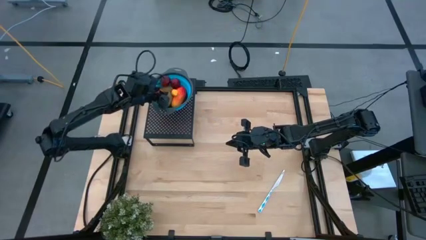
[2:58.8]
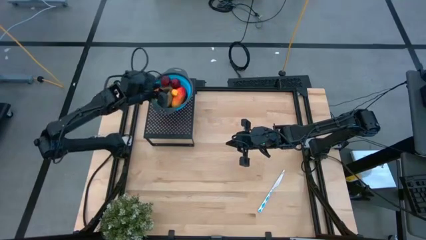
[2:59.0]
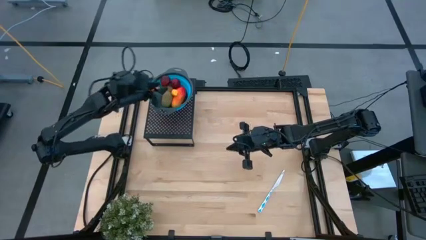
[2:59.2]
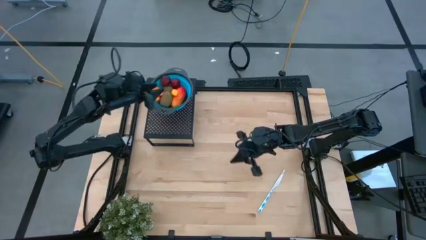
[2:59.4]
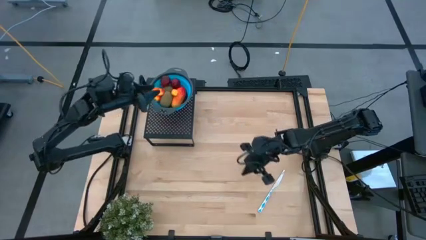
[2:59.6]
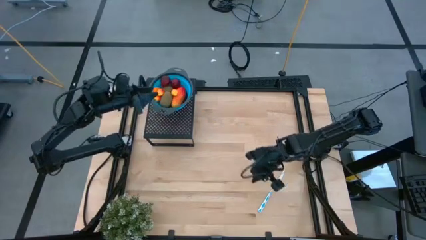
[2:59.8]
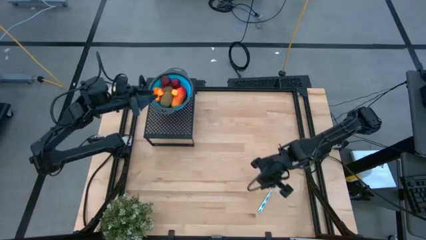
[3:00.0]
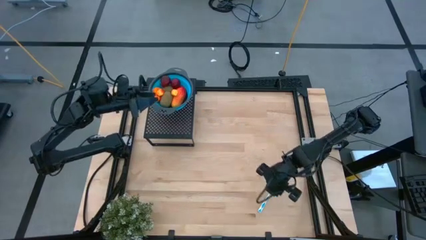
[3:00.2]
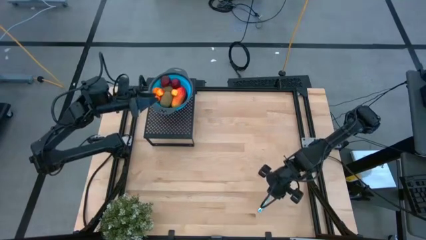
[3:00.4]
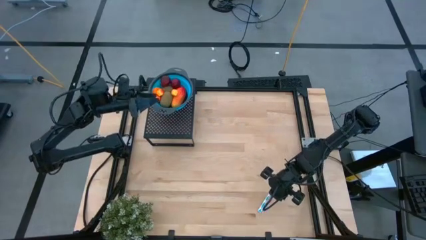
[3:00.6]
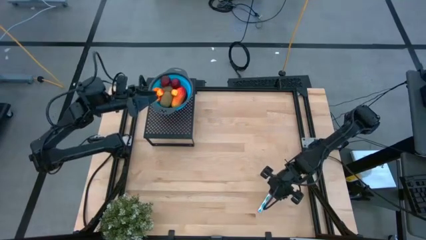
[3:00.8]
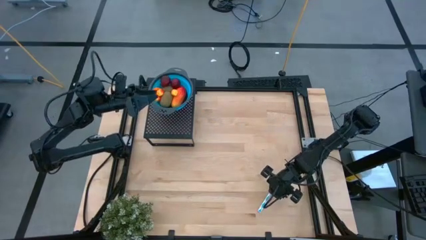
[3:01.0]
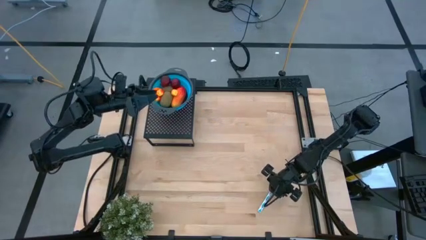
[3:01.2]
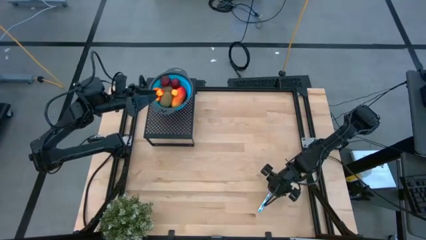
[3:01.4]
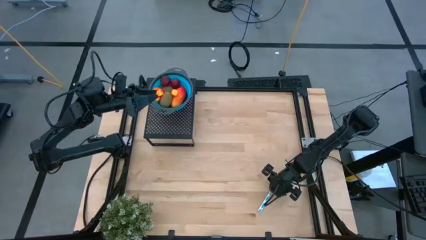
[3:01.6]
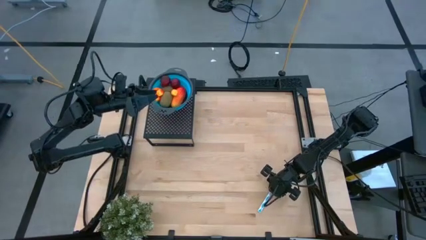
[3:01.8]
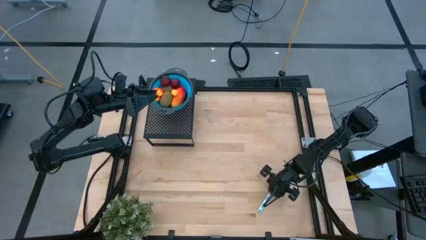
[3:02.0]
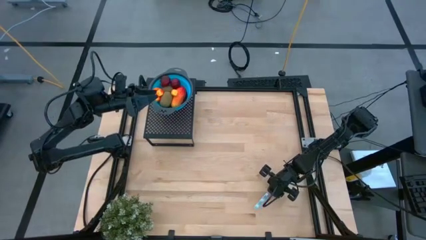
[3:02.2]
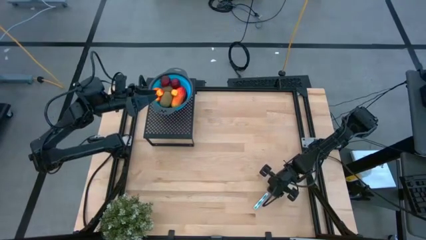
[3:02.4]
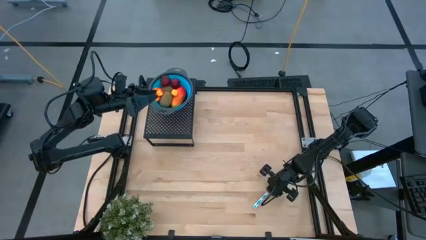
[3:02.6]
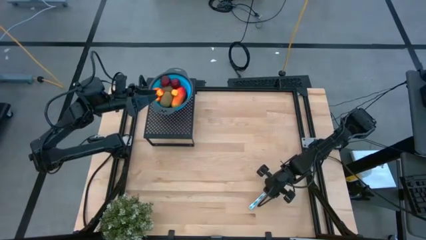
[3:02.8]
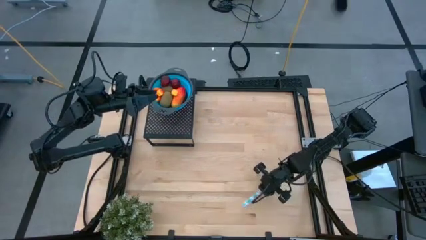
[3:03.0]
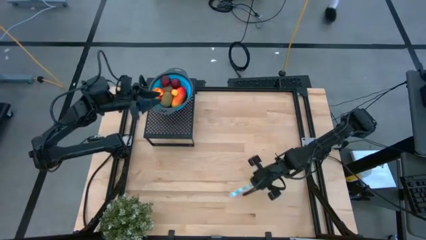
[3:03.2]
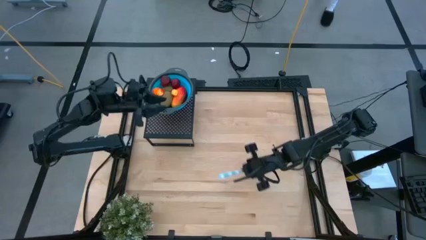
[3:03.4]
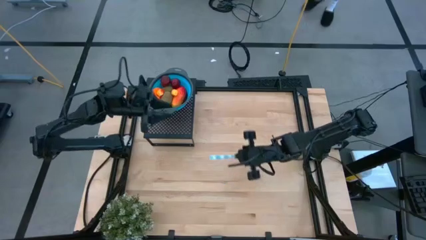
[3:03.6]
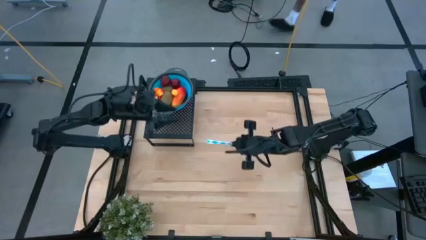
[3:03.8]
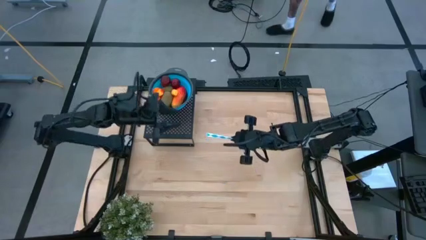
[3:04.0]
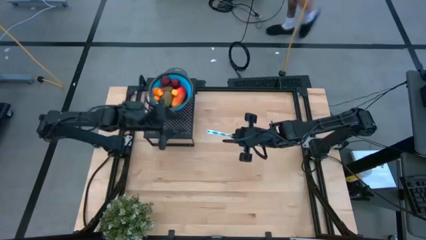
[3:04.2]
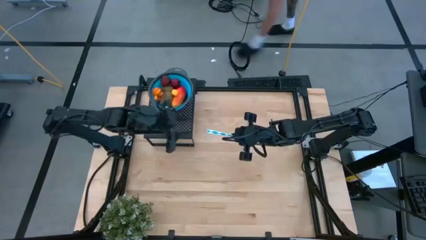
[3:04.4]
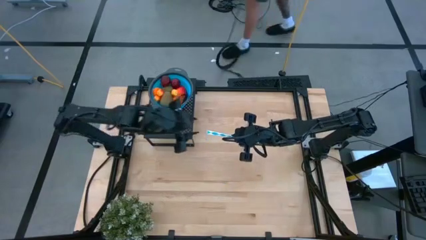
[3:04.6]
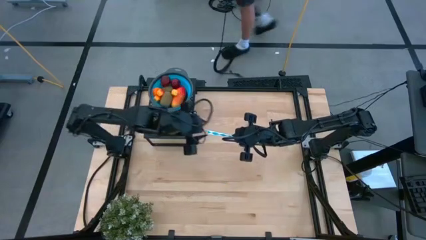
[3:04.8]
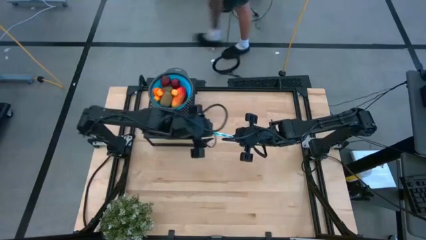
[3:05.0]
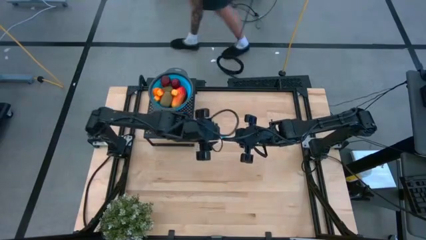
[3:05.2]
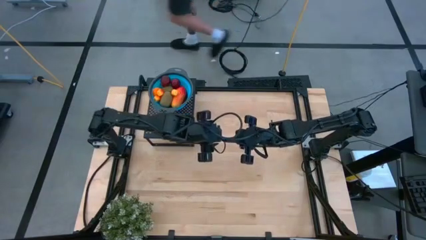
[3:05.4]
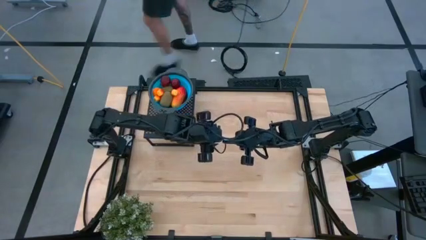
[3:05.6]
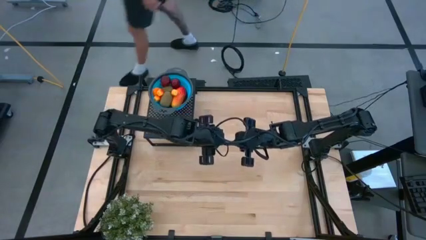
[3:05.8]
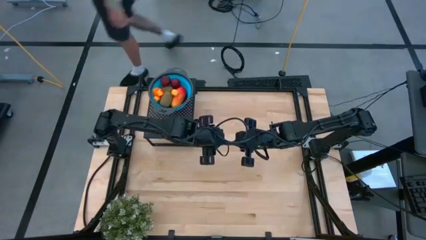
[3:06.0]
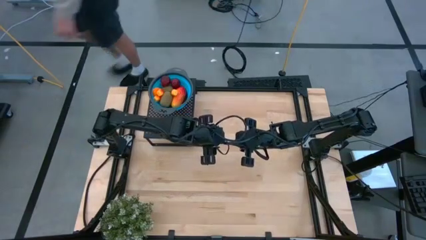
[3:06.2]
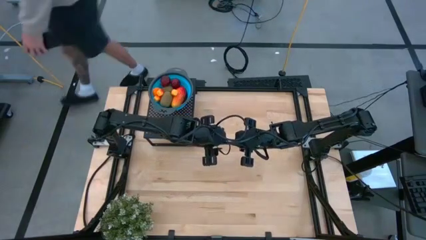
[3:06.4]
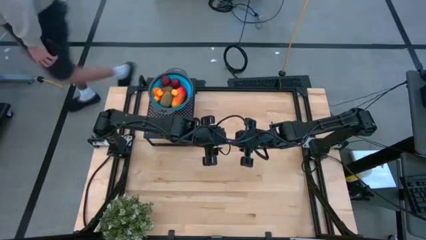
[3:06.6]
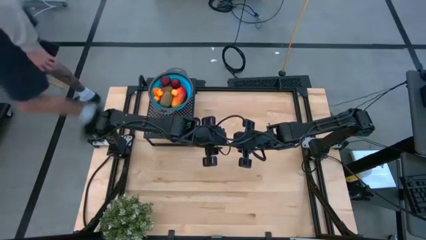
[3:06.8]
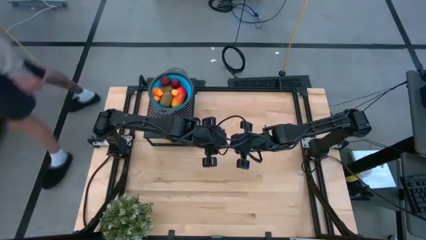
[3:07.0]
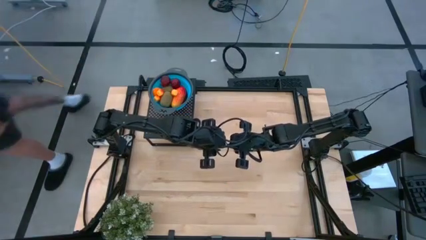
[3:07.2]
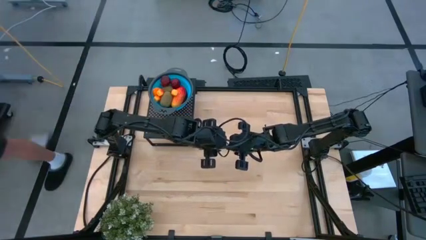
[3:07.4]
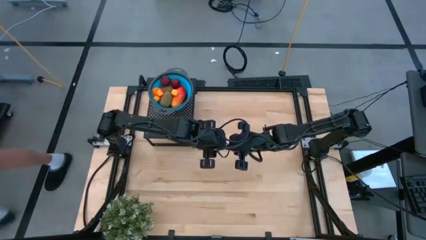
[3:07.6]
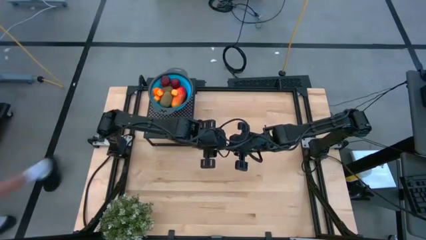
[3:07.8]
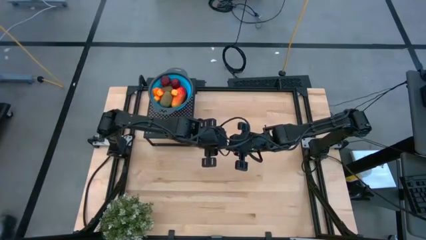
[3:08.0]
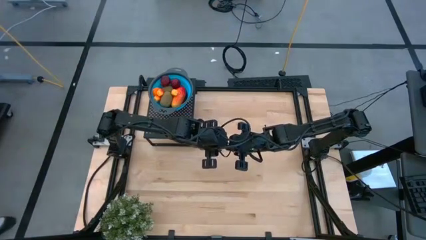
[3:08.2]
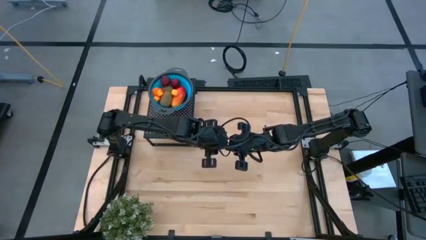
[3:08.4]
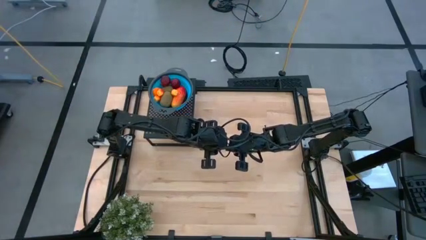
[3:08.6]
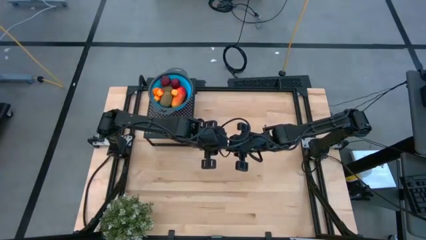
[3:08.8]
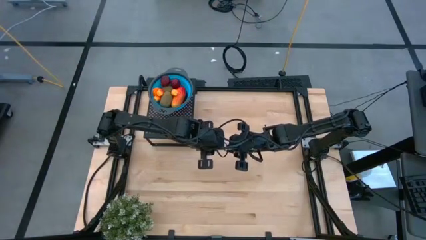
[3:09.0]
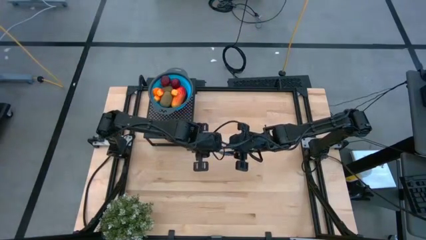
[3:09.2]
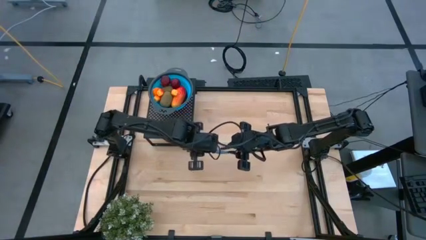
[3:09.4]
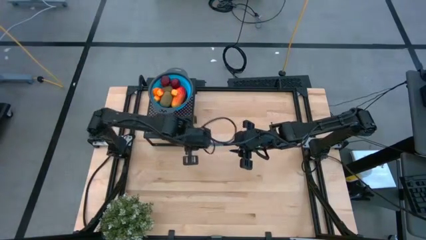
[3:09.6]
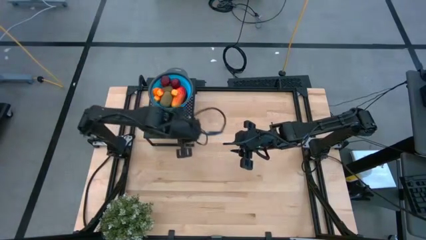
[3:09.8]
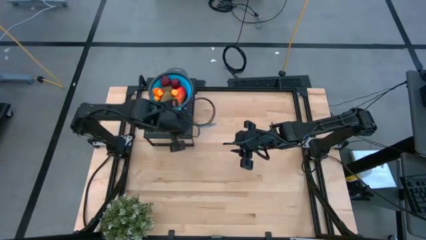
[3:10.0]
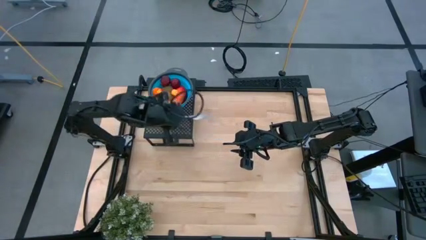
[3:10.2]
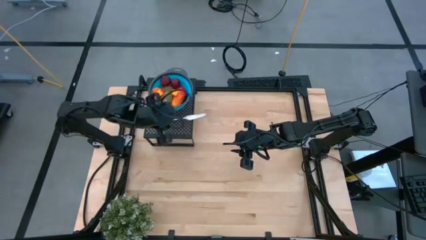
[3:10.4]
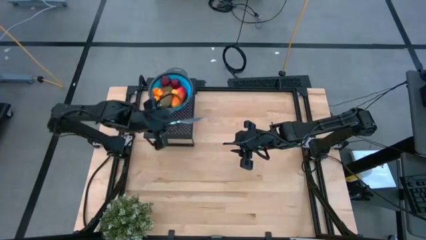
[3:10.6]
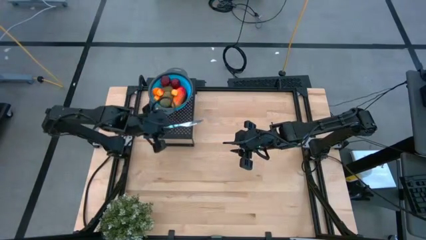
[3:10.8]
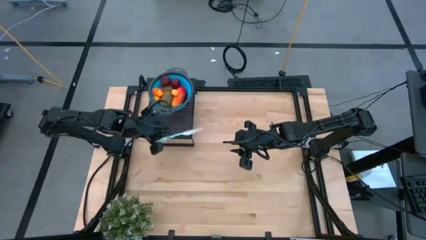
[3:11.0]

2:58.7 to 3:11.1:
Task: Pick & Place Fruit
Put the blue knife on the shelf

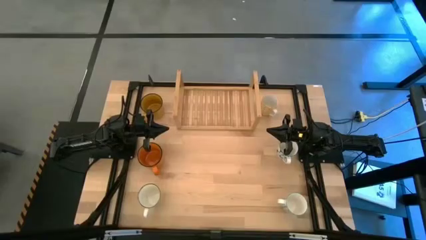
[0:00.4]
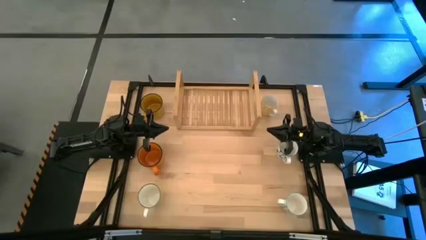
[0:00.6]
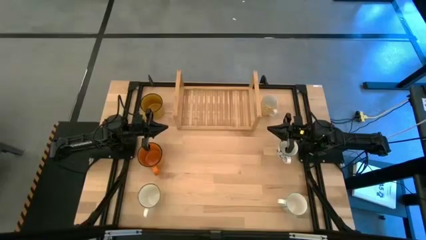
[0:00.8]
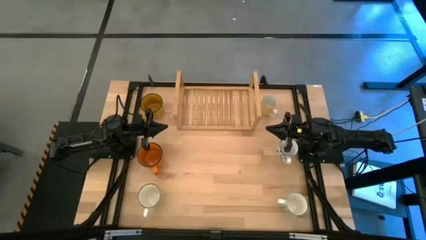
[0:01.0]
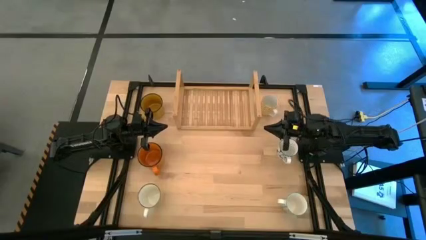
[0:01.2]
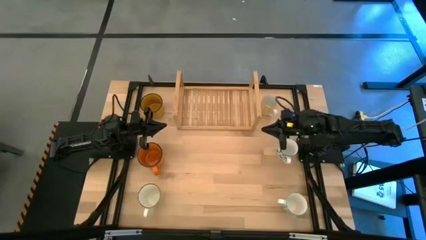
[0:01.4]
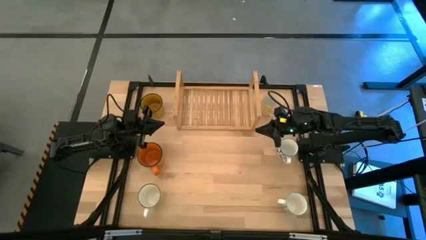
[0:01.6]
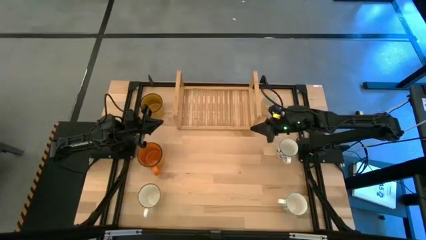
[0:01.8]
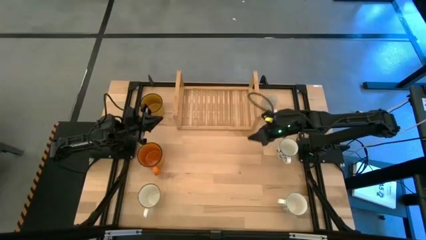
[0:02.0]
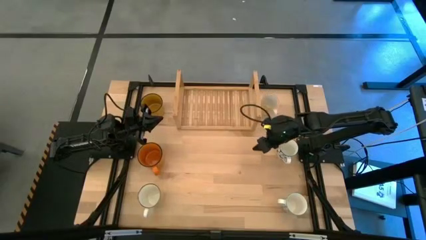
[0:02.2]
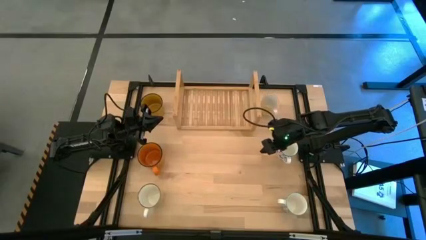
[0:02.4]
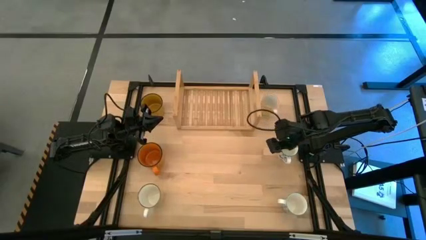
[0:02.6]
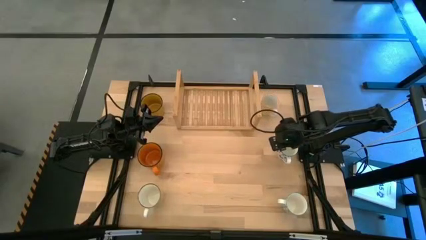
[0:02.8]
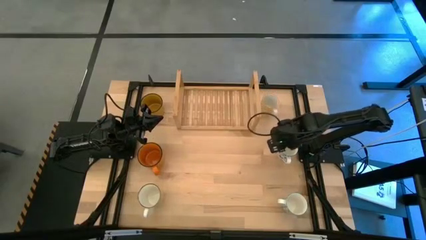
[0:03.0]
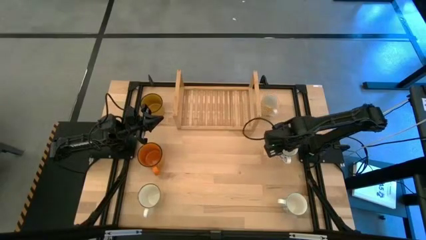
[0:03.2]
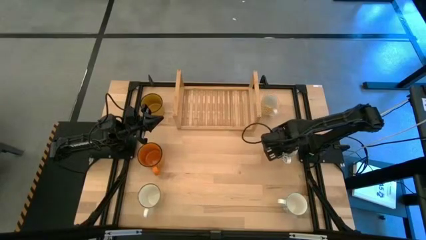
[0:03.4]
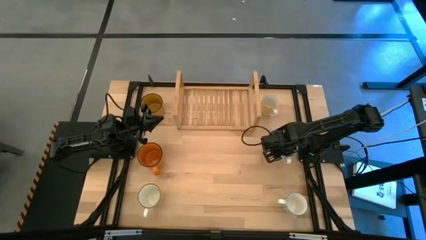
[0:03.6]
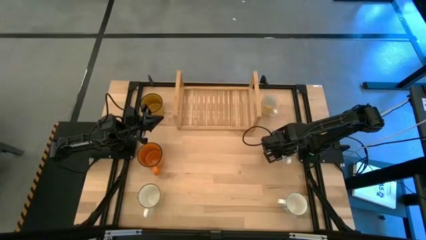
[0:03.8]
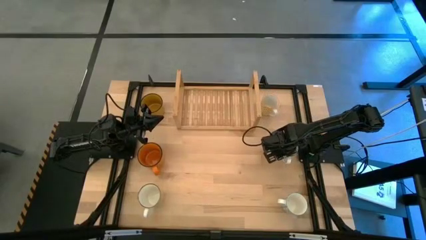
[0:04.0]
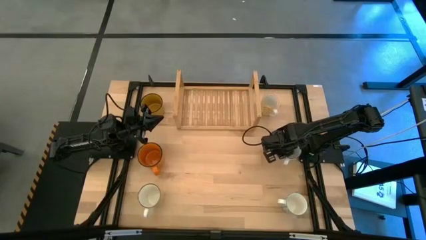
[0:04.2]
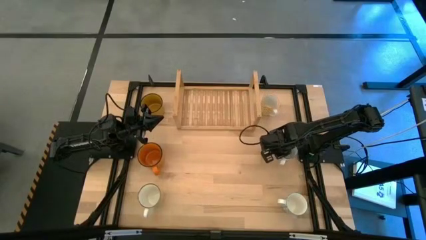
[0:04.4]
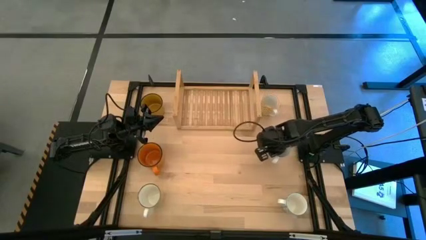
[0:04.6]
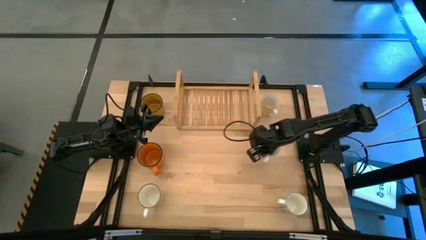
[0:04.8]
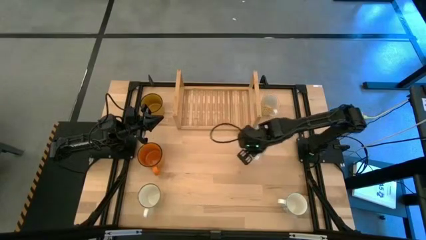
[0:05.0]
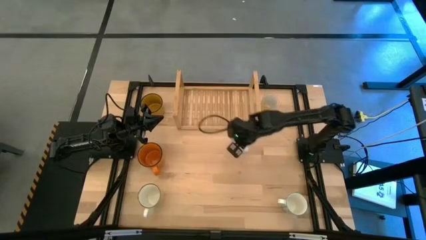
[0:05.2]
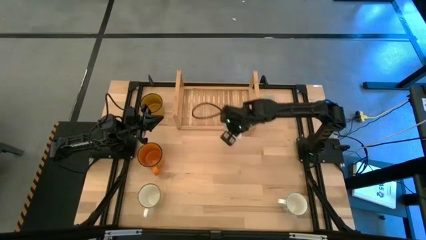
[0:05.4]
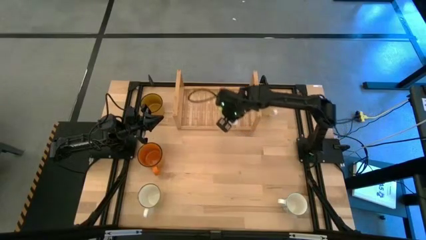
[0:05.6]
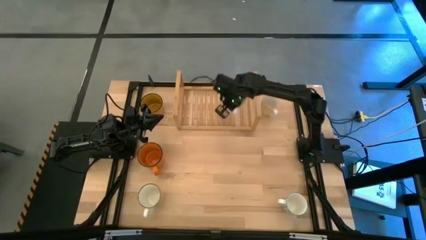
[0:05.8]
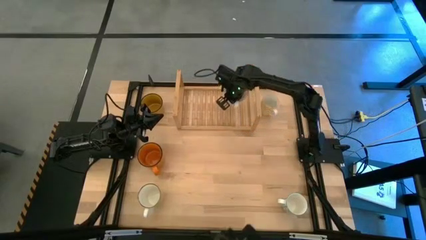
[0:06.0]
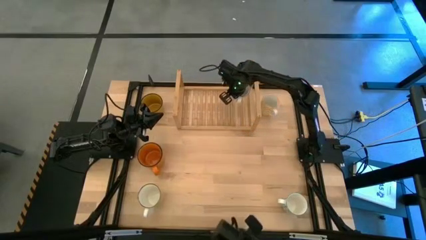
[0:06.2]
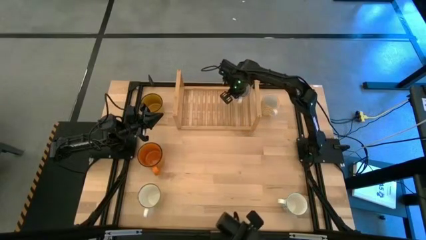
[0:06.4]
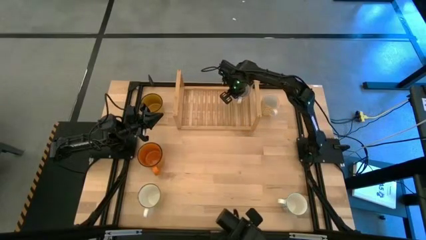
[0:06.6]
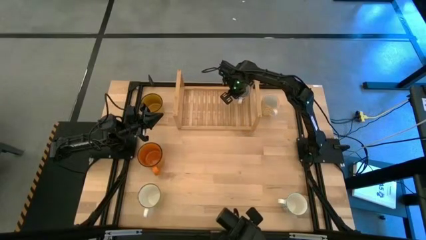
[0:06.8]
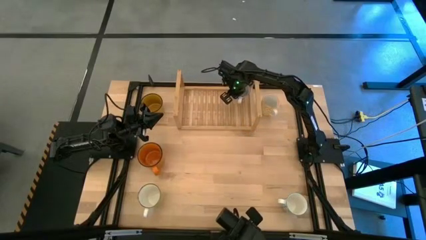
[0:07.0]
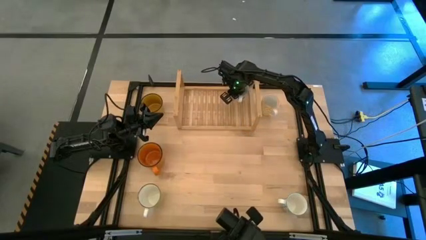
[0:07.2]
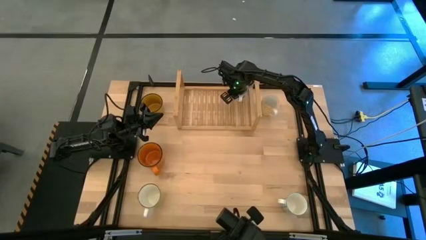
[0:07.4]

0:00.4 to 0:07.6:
Task: Place coffee mugs
Put the blue patterned mug on the shelf
